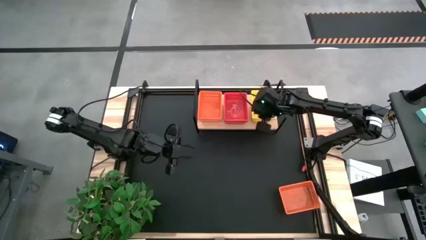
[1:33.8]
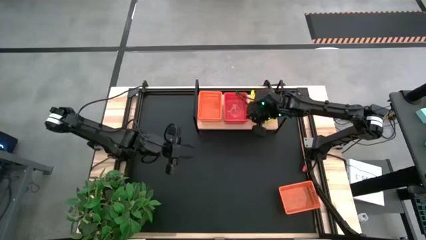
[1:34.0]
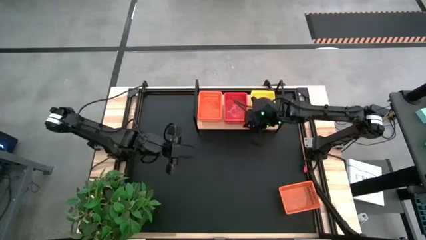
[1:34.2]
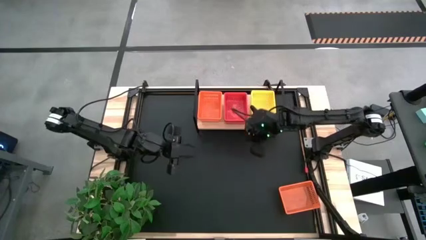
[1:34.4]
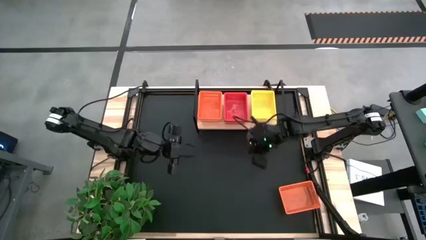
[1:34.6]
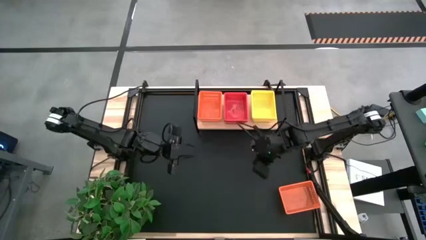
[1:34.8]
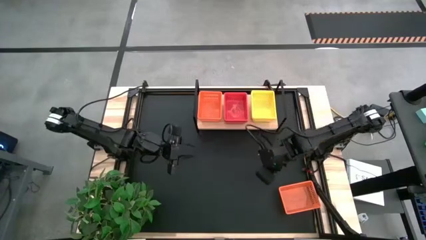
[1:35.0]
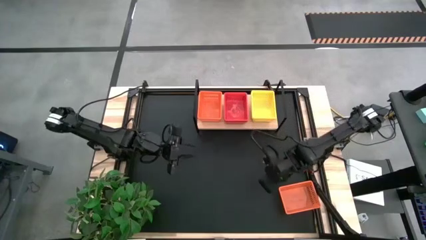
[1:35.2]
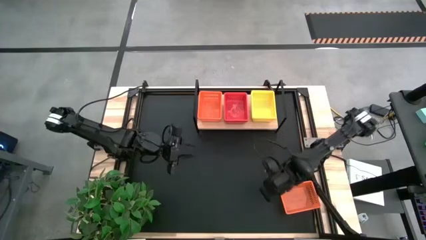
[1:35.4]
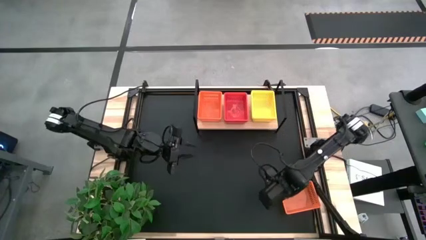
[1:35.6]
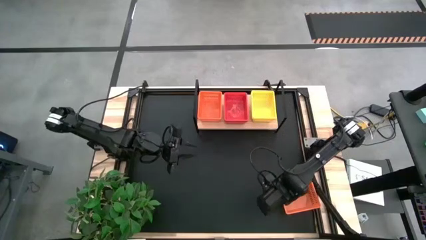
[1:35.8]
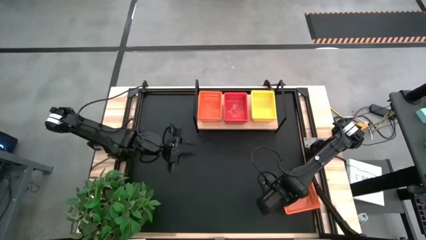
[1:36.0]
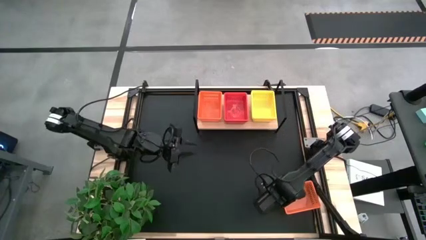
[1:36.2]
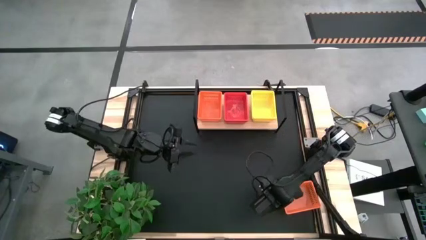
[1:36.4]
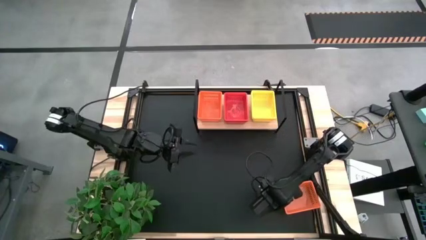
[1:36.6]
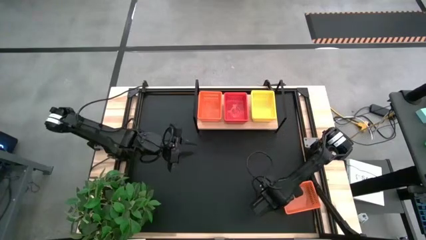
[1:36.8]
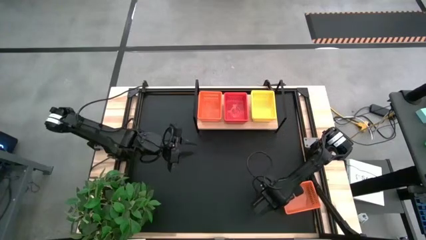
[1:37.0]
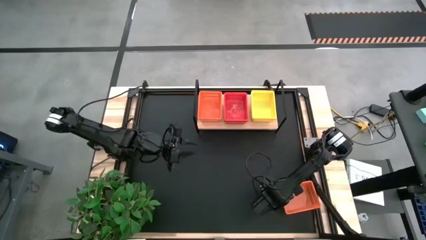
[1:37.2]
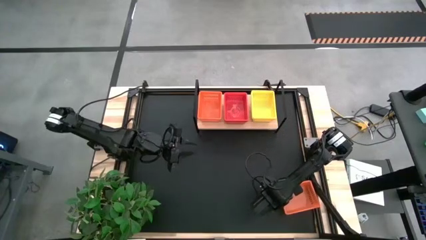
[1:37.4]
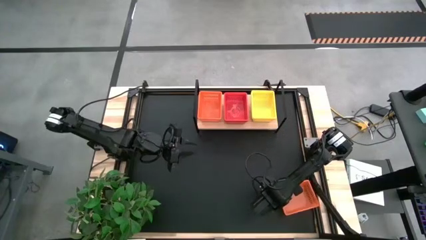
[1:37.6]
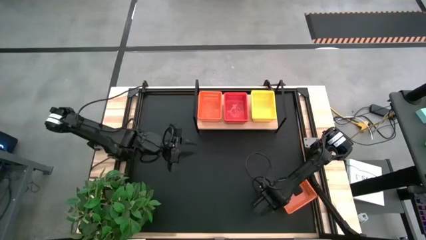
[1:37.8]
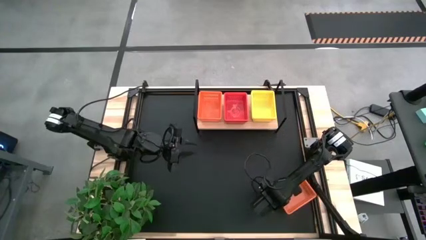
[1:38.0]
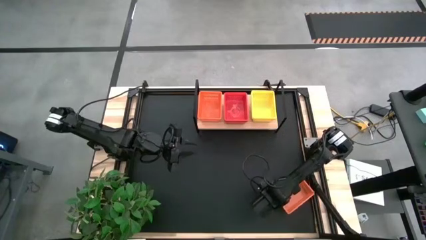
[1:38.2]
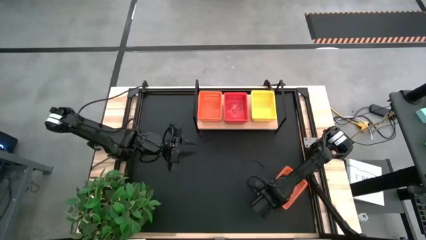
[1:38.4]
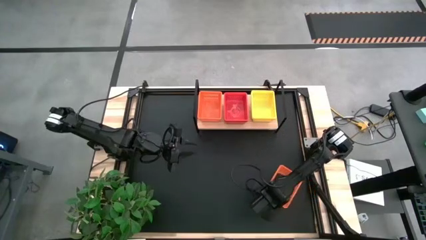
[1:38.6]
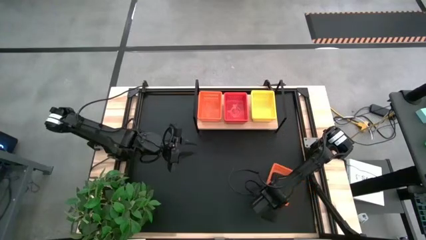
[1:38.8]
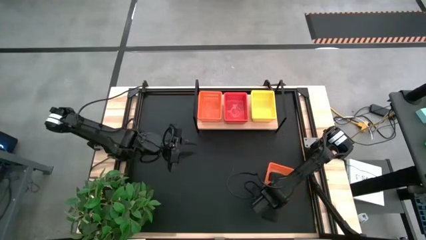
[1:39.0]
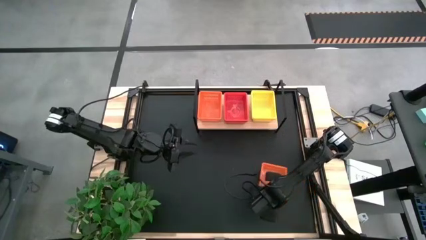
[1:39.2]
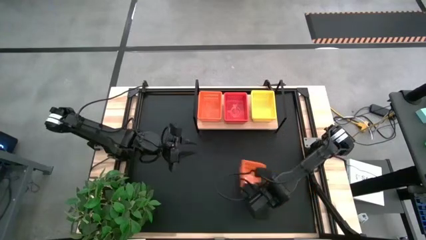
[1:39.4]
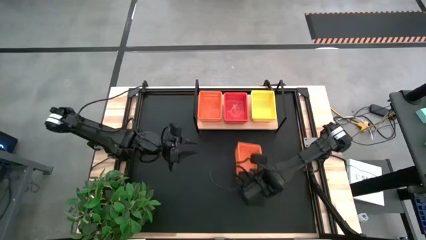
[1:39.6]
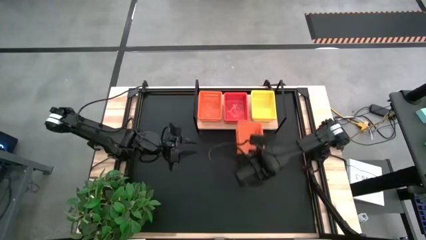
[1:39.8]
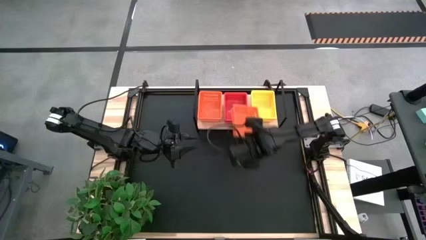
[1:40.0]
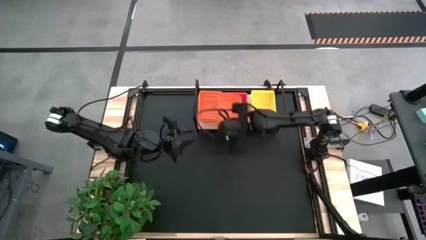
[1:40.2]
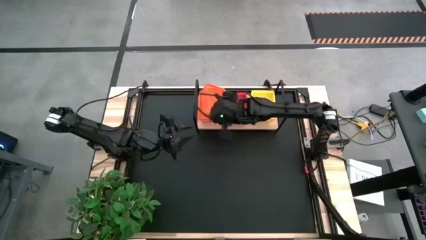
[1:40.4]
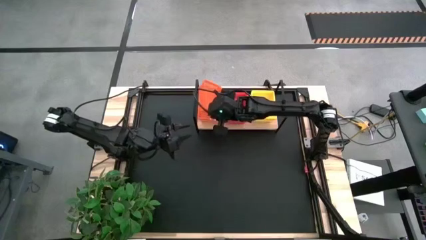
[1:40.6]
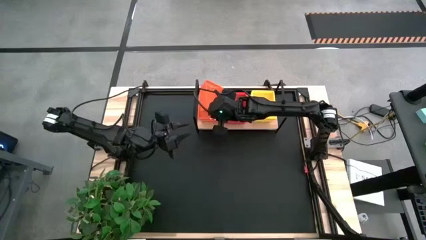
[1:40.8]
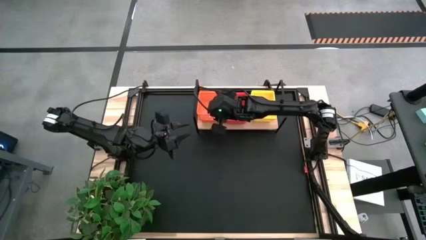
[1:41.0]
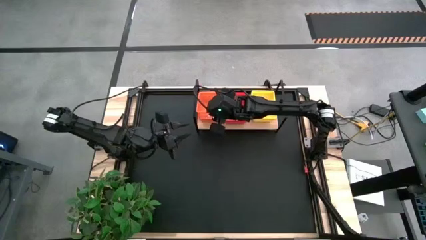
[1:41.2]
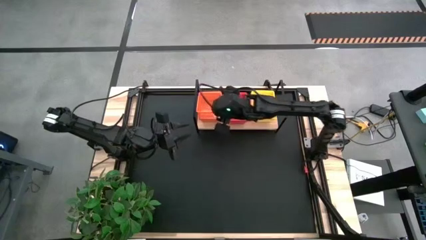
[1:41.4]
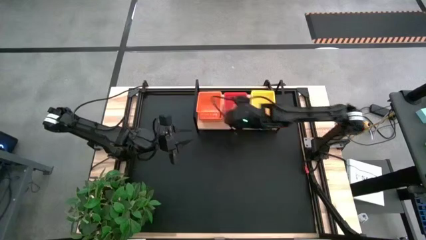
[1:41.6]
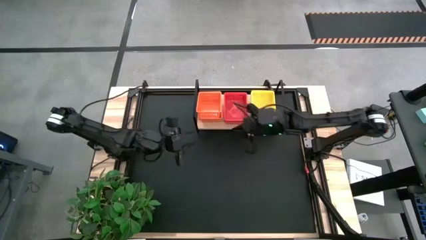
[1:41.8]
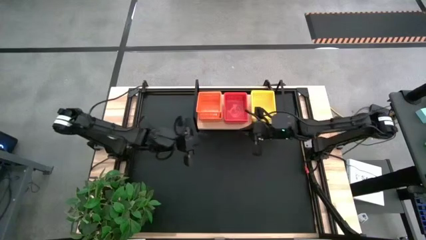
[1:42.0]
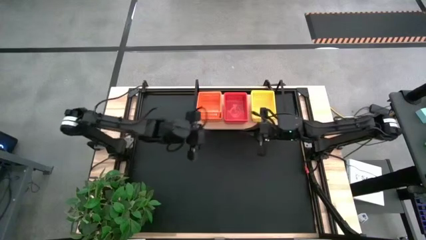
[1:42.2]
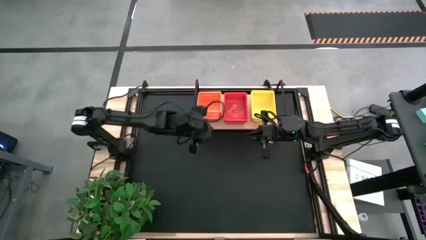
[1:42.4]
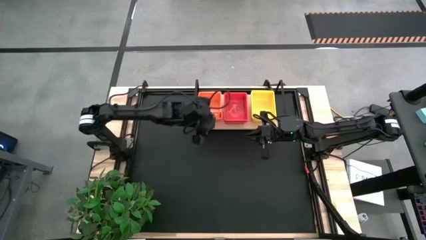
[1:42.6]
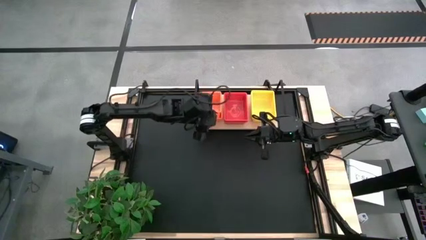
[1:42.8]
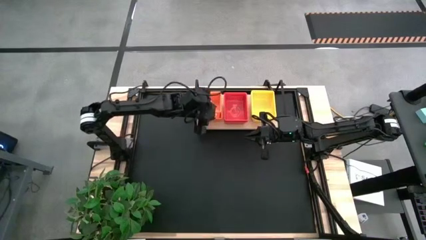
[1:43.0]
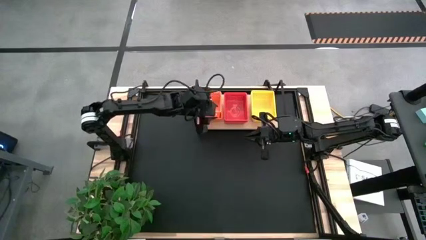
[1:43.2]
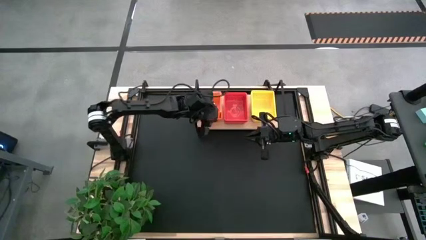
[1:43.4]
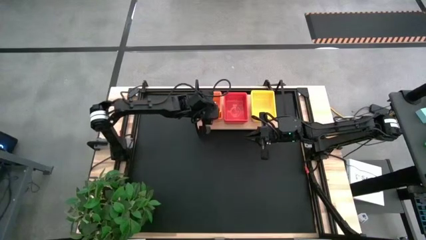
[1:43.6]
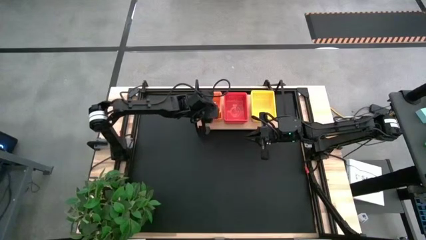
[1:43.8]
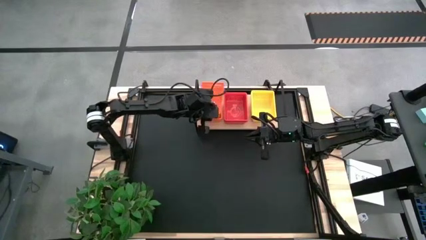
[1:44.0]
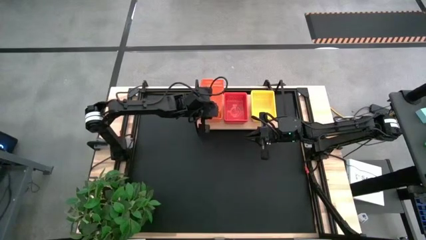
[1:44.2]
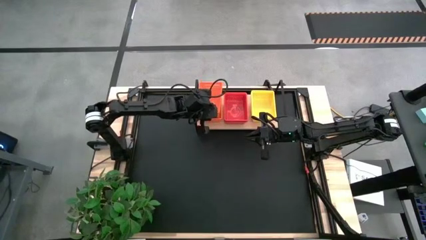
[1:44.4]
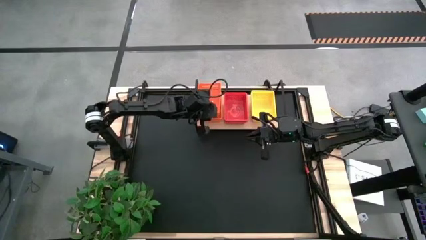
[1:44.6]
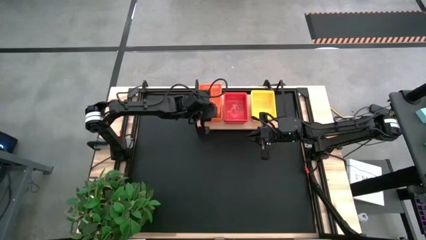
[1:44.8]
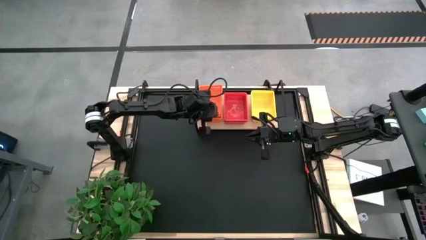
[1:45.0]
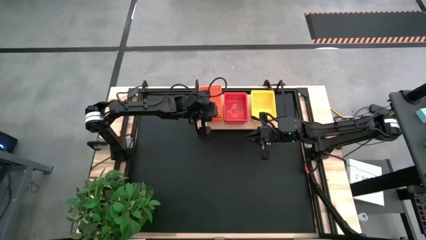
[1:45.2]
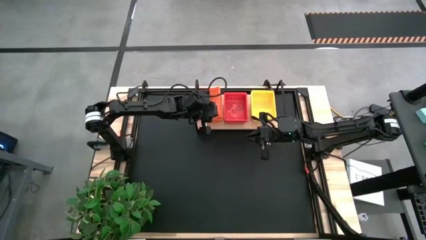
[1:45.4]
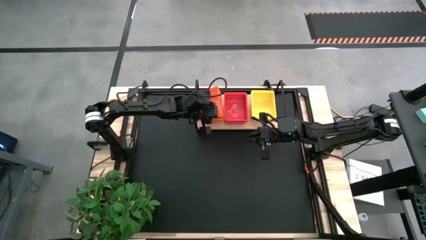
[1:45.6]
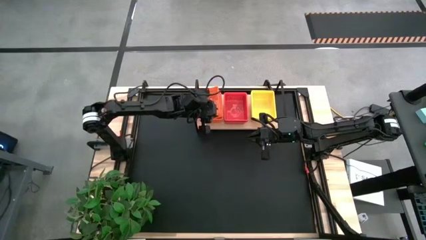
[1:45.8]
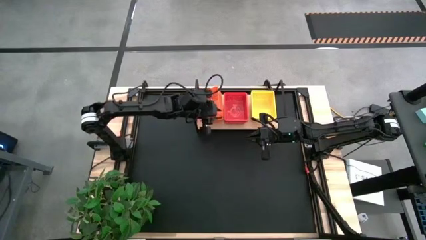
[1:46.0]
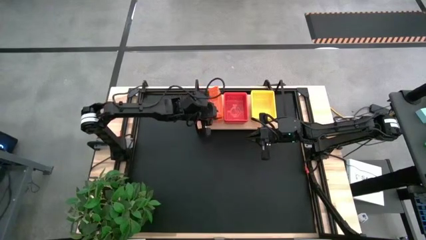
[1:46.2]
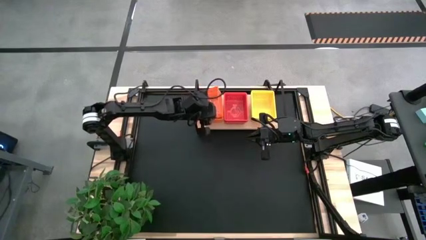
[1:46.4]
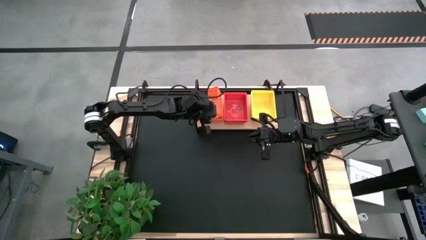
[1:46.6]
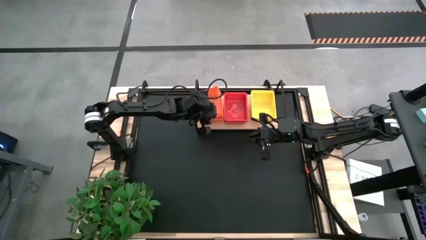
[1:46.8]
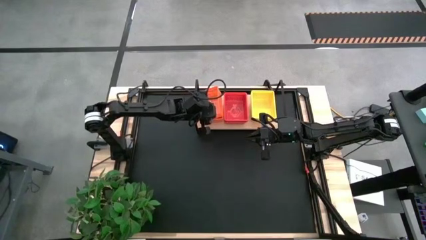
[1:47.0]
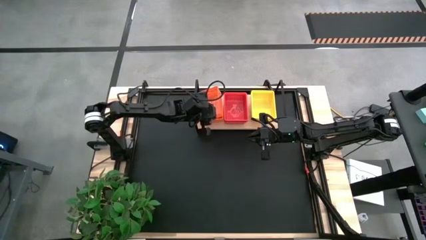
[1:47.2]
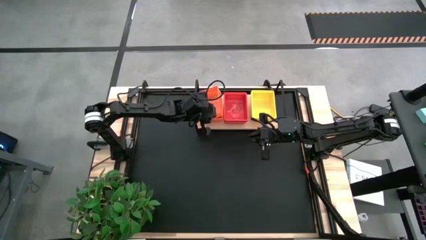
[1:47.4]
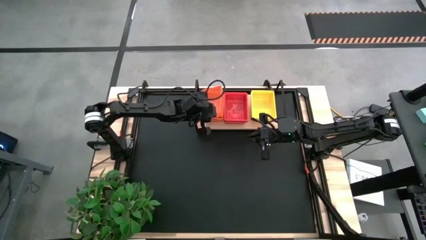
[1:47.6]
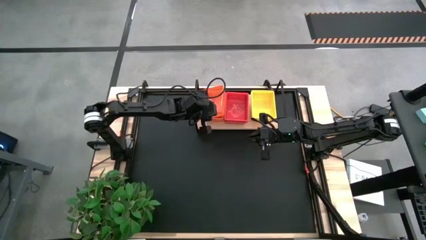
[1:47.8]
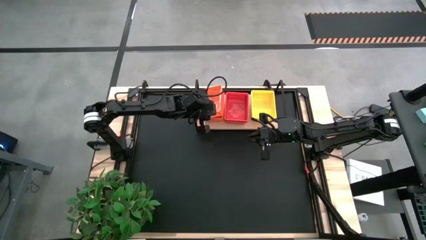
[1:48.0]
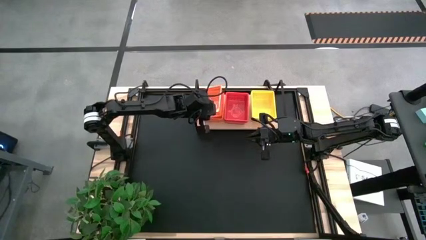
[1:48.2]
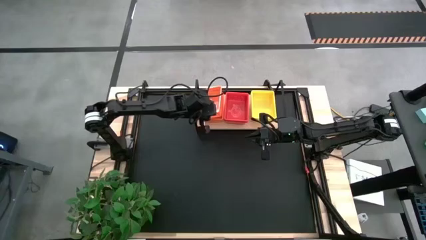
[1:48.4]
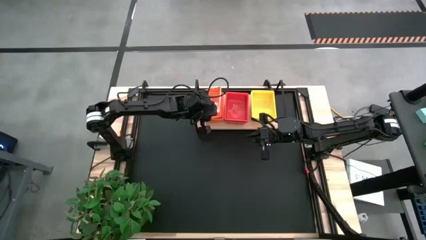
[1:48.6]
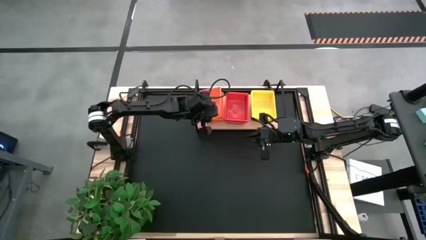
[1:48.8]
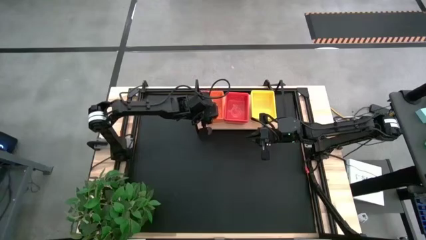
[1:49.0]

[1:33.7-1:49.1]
Task: Stack baskets on shelf by color
Stack the orange basket on top of the orange basket on the shelf
